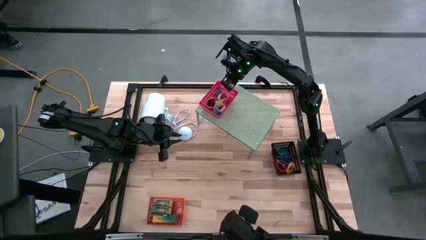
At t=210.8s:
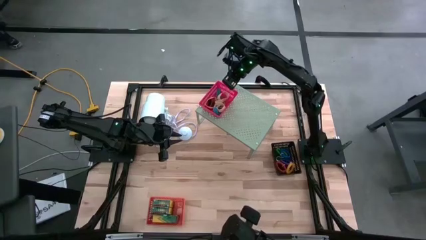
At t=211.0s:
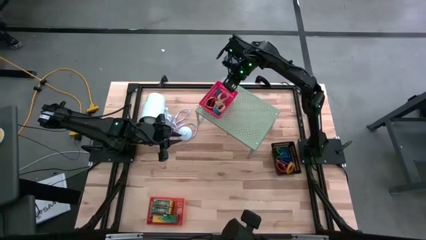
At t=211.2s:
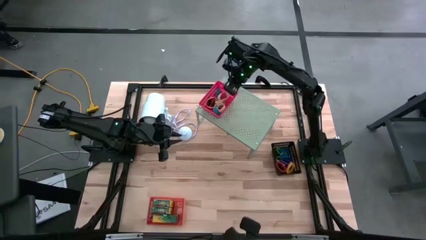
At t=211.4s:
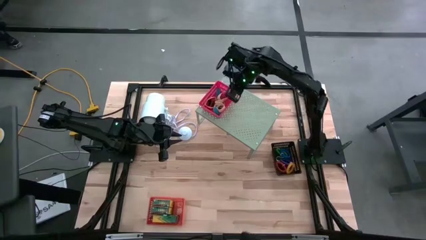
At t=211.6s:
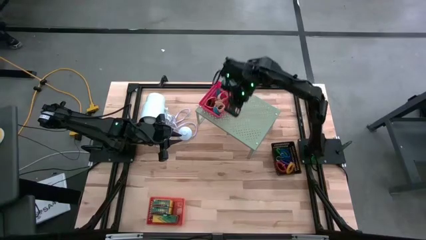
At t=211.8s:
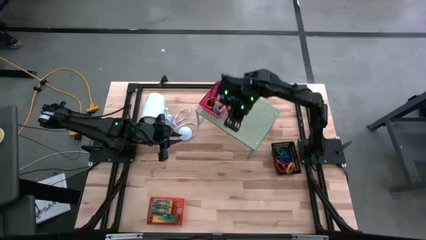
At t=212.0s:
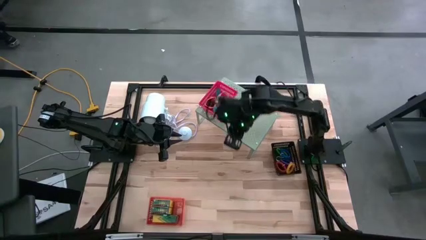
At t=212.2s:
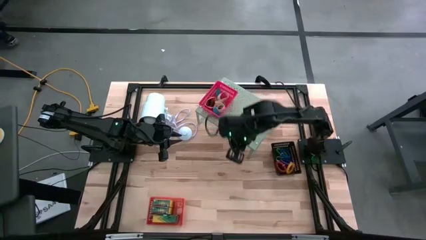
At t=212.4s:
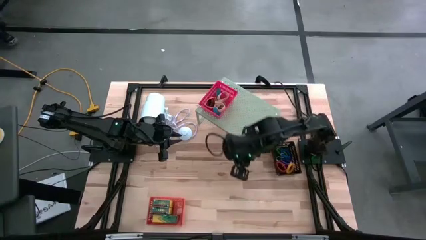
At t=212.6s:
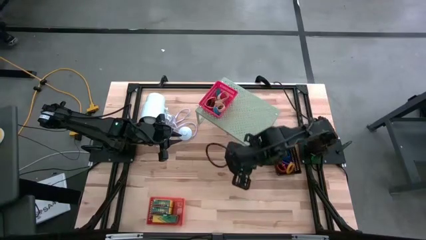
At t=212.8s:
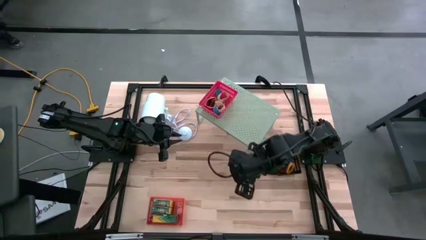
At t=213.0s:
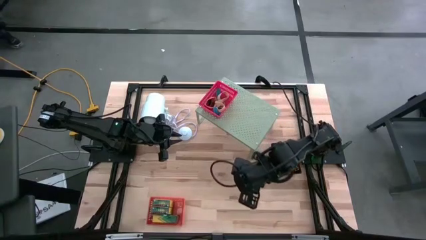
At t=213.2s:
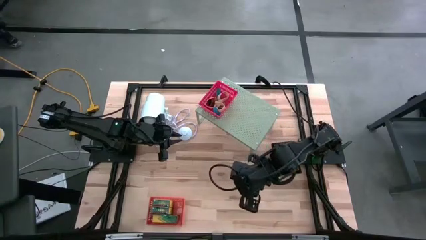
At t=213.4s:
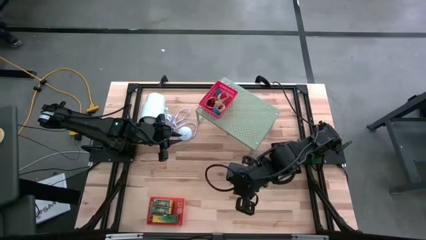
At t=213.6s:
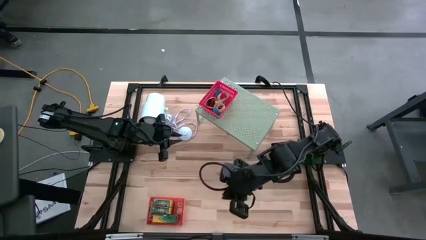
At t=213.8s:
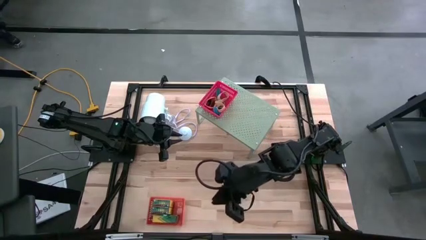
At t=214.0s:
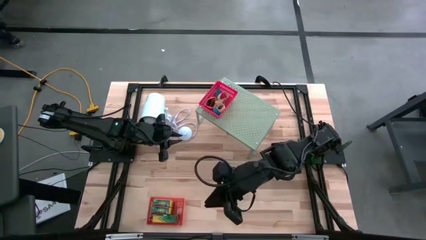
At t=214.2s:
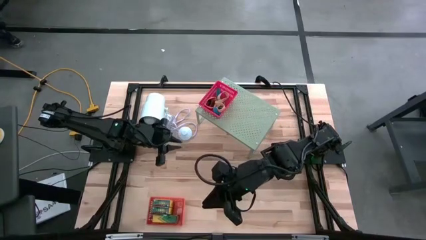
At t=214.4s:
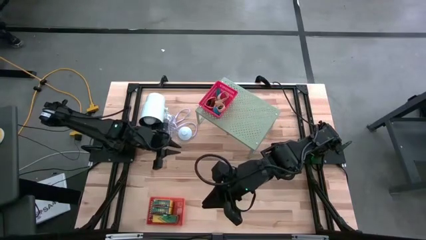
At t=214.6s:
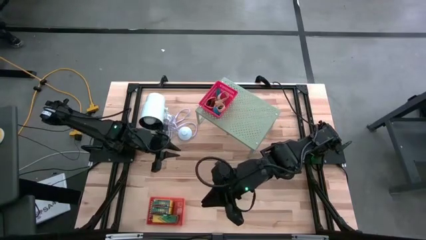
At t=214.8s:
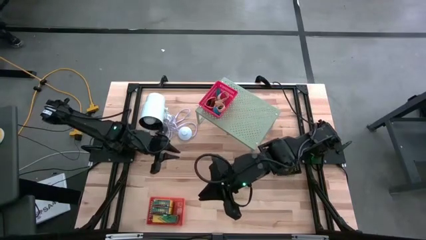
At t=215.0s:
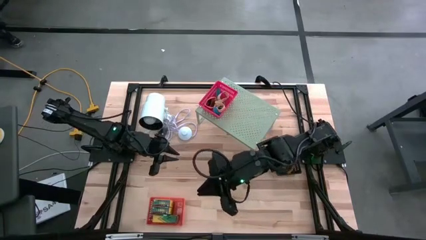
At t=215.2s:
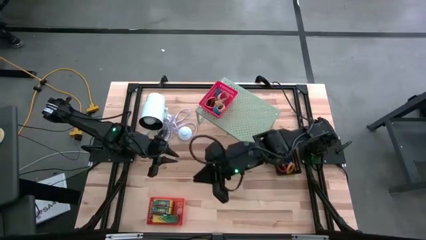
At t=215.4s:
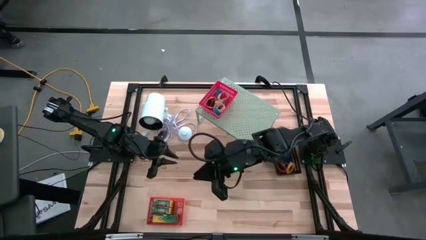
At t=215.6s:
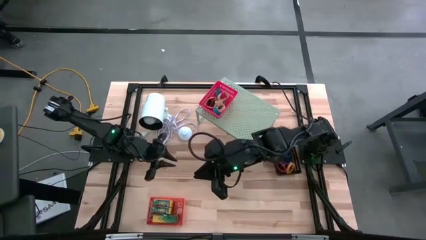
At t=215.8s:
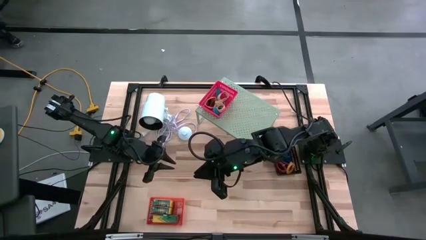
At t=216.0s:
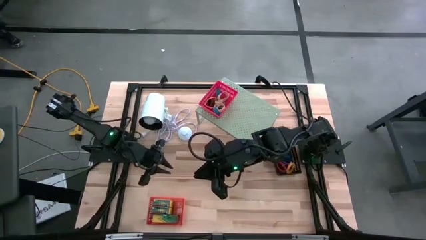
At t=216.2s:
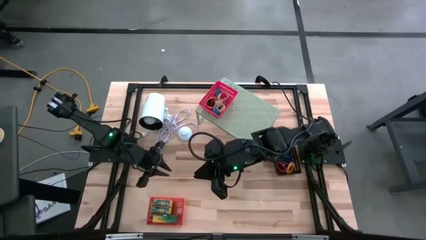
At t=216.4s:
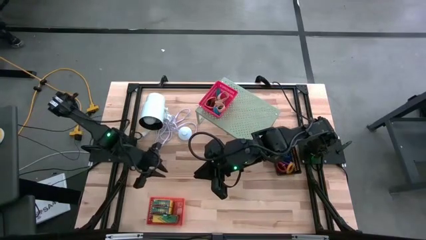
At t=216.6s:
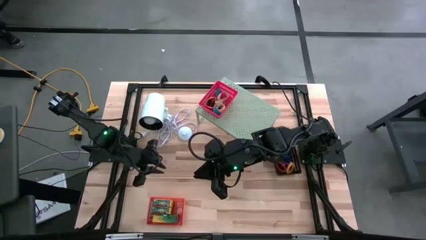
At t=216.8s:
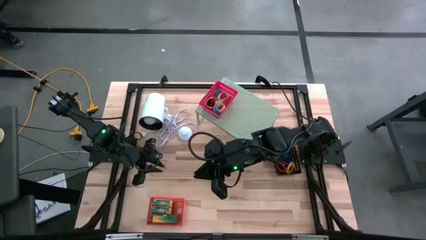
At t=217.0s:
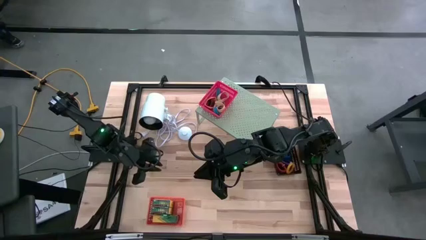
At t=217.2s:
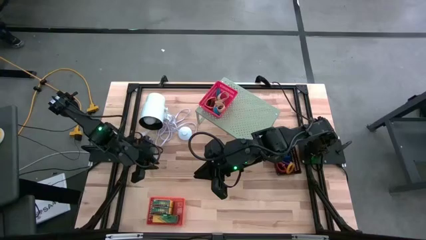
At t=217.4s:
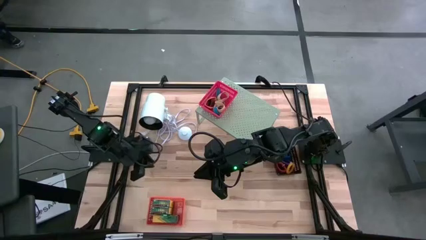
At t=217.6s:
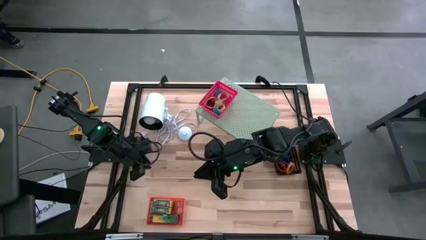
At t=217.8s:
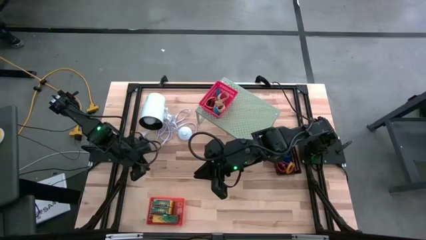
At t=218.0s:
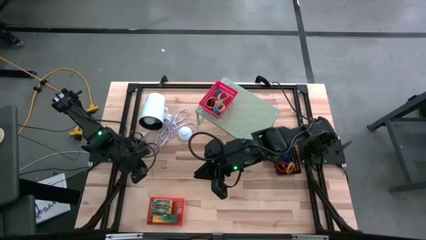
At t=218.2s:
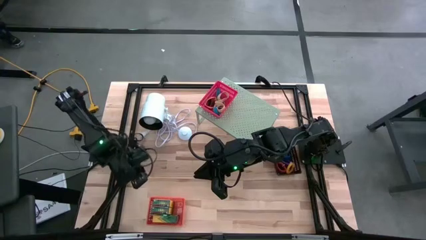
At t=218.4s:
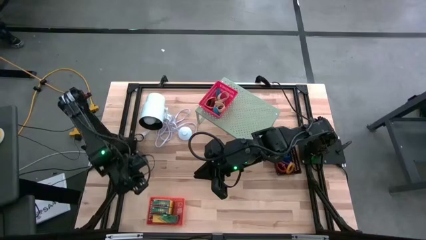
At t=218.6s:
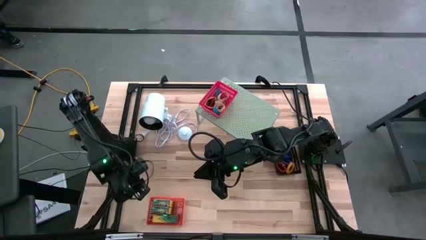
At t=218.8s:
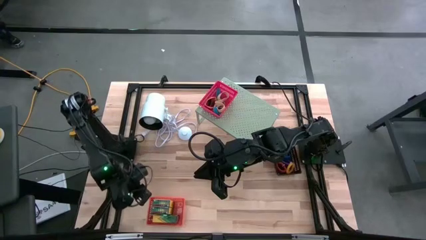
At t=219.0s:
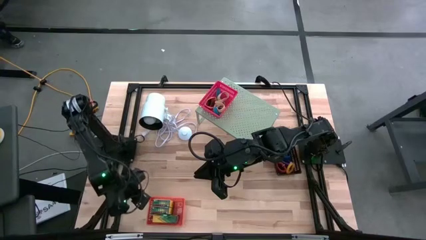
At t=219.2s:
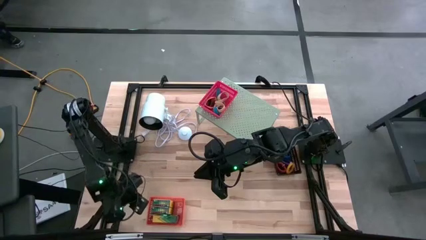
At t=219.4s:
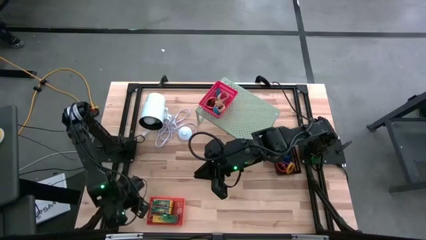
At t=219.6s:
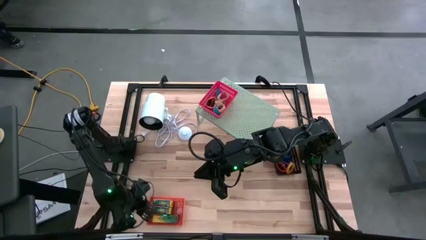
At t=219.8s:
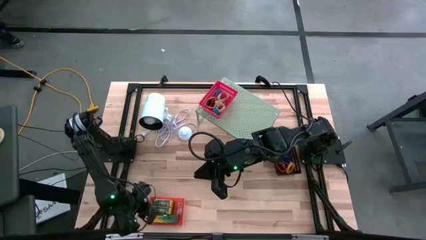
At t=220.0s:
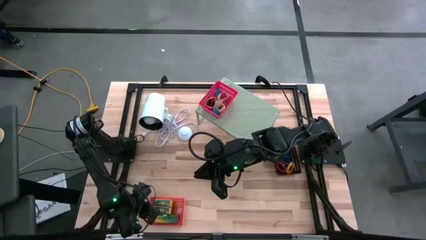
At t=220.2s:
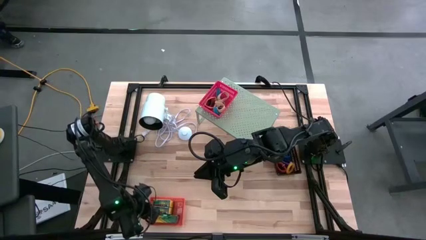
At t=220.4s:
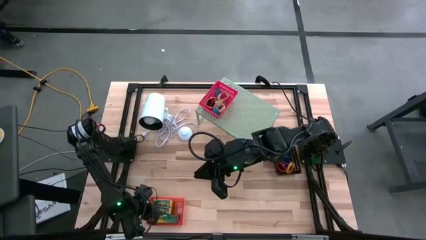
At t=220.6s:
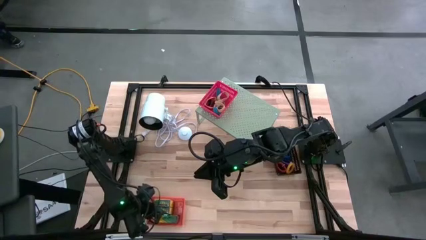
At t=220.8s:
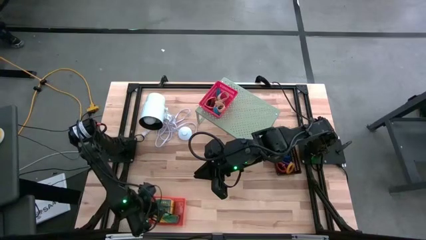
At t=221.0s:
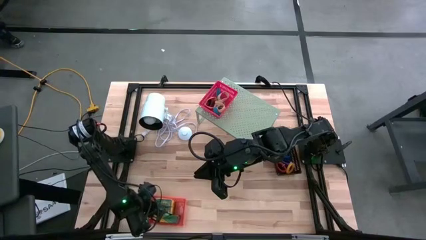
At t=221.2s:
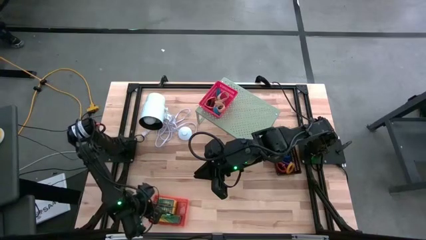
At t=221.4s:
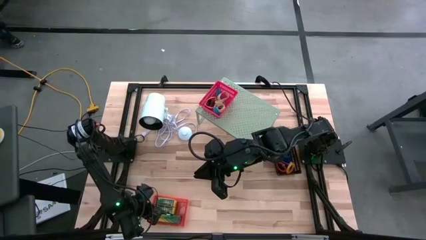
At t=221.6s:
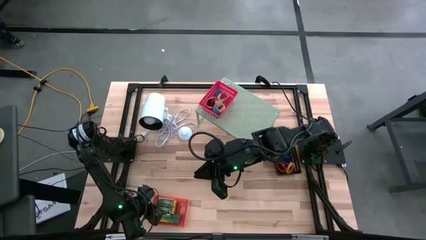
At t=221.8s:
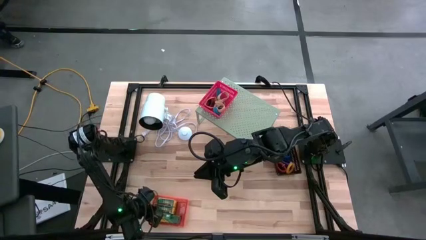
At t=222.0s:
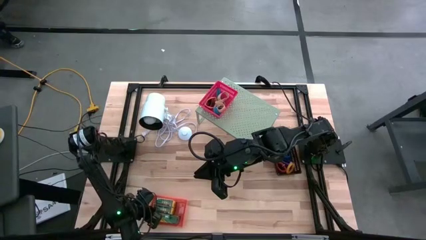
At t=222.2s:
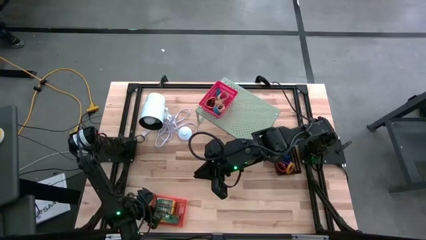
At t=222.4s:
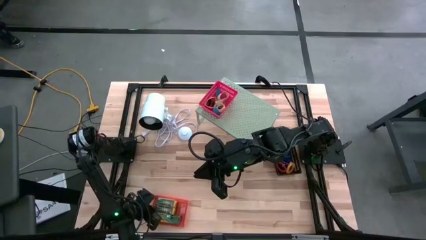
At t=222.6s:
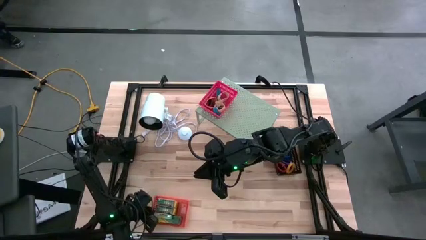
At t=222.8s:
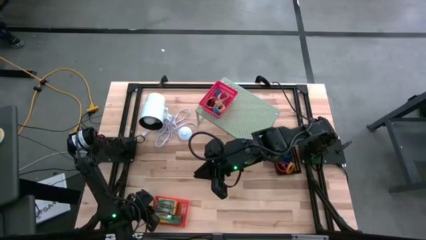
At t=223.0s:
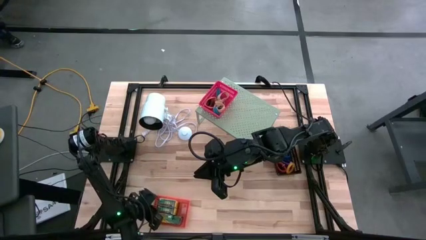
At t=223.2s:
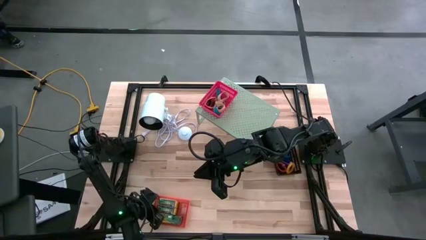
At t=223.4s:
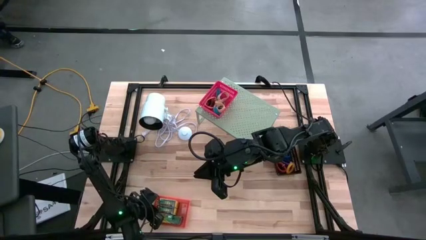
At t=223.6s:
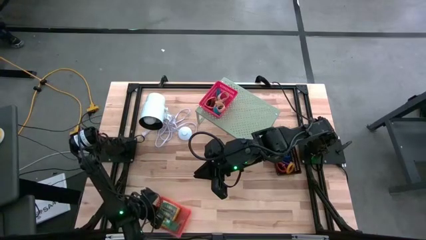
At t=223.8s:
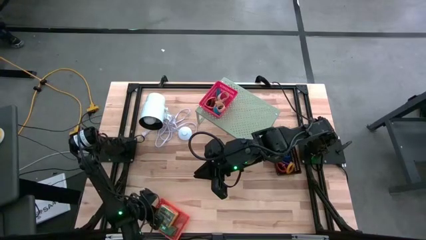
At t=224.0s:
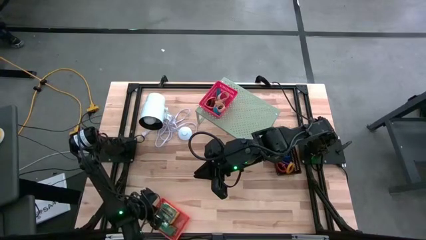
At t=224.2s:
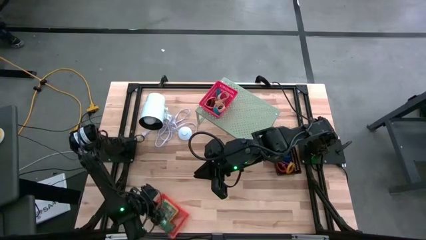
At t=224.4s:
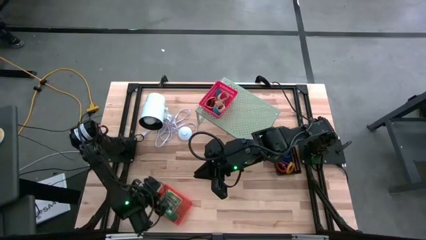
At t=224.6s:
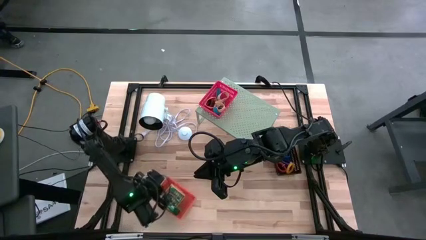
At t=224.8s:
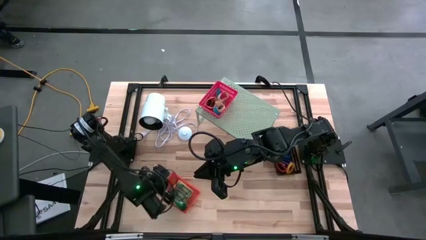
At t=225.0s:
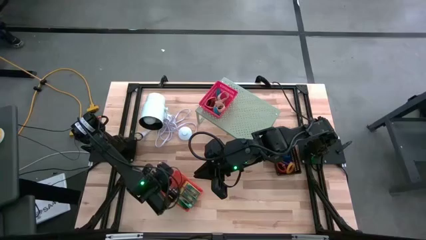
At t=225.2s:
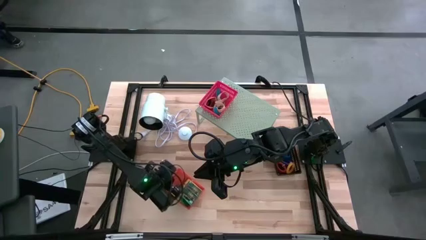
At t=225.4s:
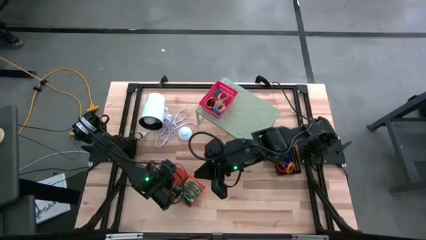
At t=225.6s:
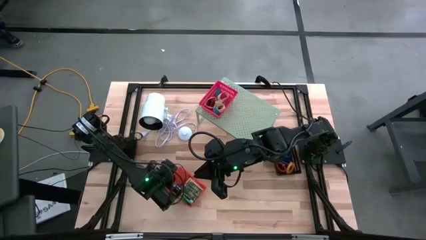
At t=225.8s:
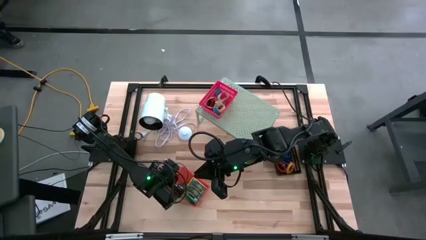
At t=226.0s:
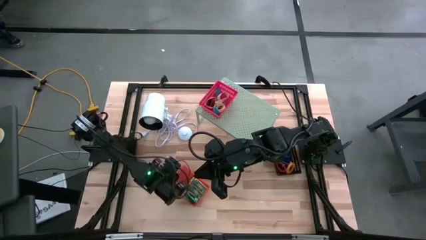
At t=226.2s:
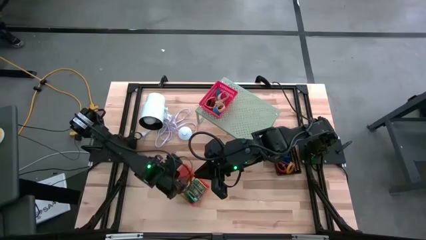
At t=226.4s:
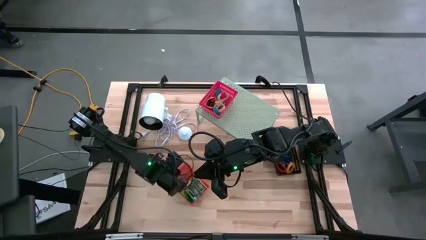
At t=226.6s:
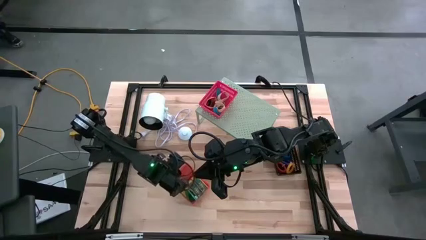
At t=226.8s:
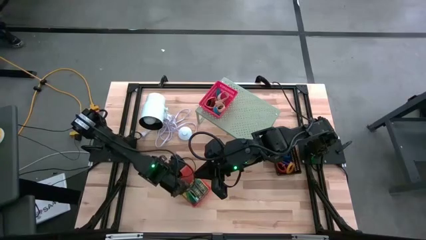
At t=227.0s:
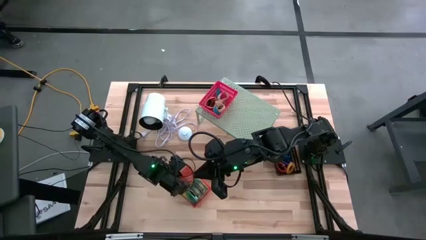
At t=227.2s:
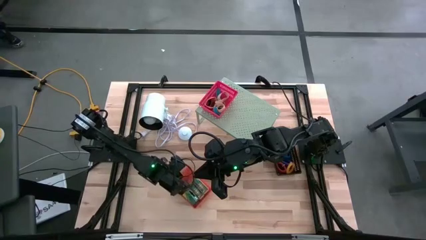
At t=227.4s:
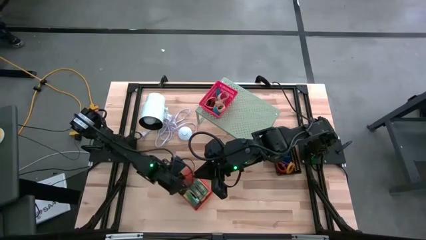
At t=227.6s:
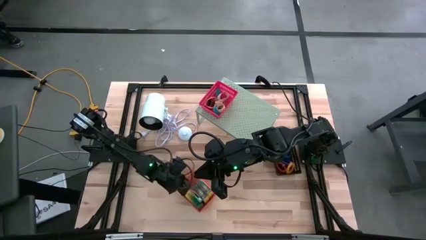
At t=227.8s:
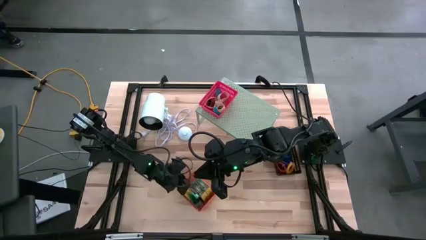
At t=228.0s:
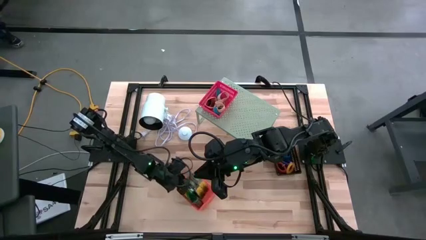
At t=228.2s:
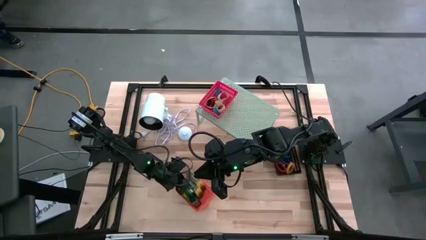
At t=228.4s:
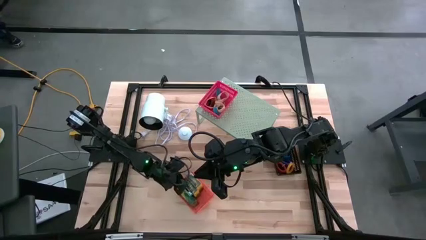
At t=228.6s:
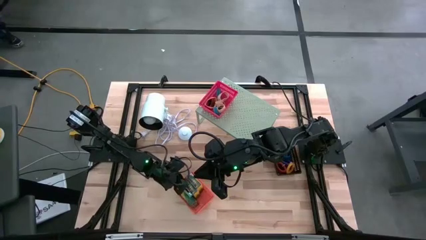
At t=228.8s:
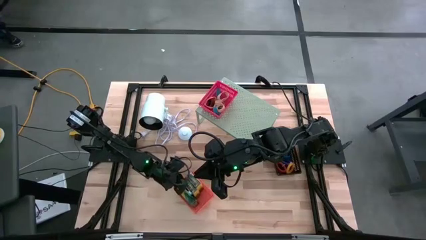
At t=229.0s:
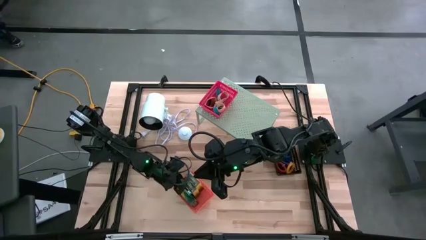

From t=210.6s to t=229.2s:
Task: Pick & Place Office Desk Supplies
Put the orange bin into the shelf
